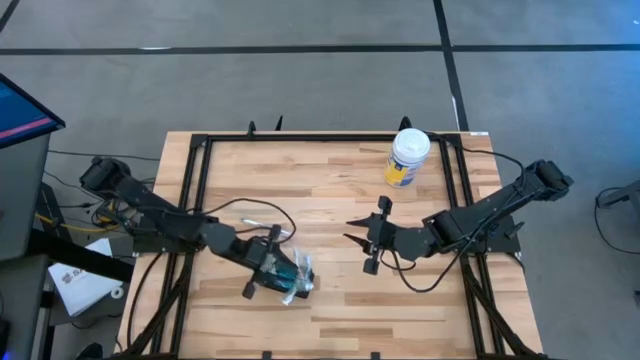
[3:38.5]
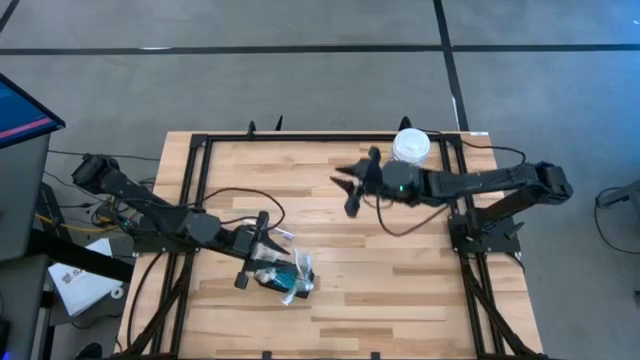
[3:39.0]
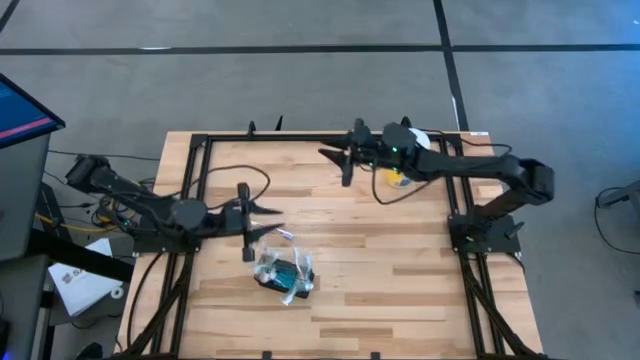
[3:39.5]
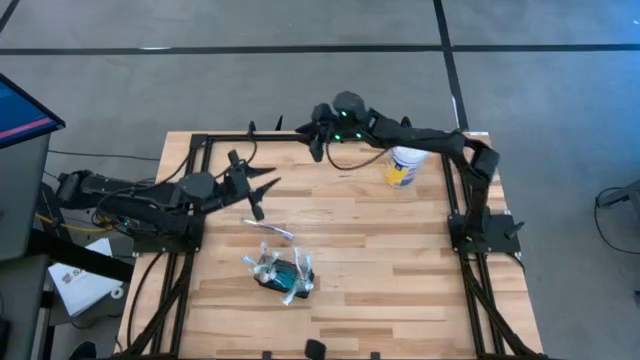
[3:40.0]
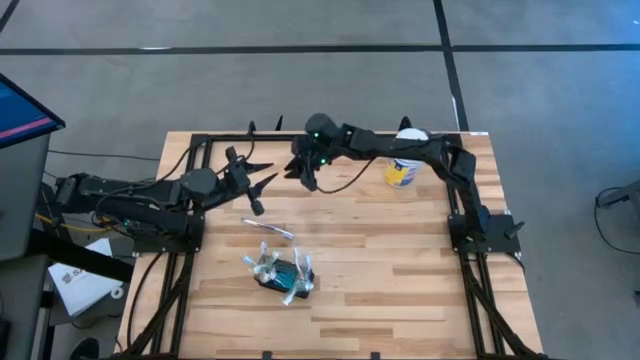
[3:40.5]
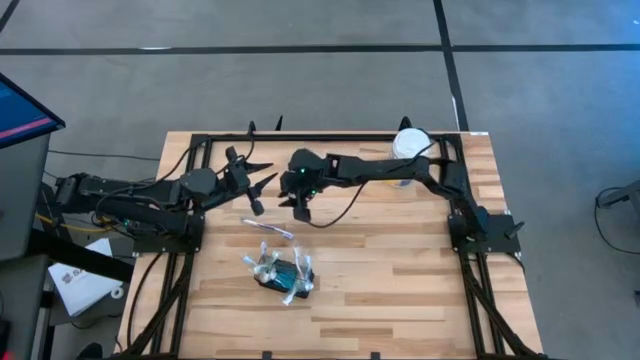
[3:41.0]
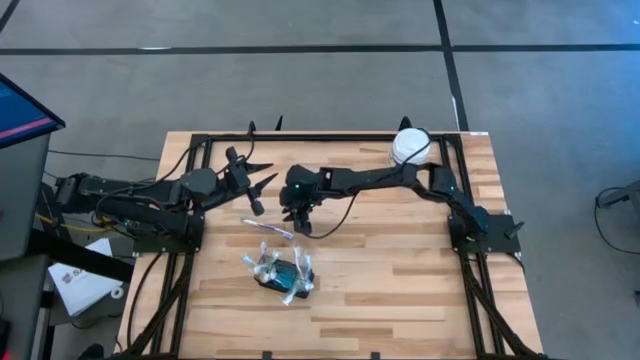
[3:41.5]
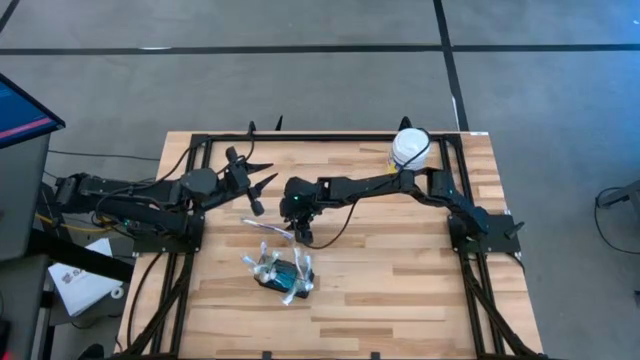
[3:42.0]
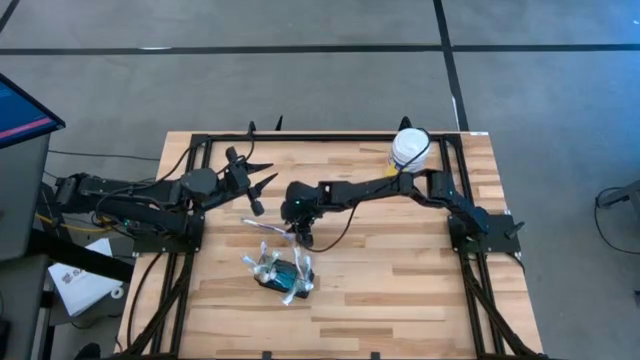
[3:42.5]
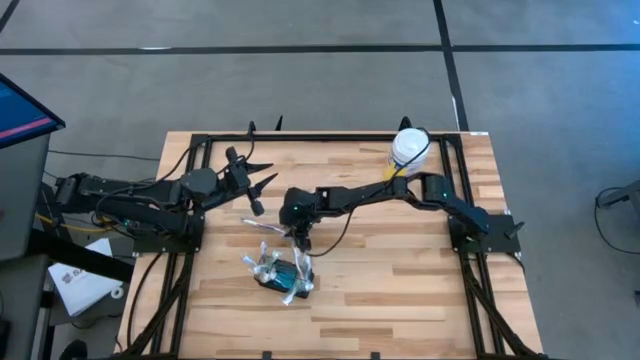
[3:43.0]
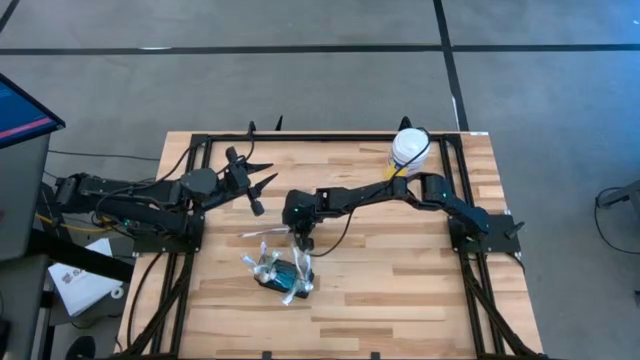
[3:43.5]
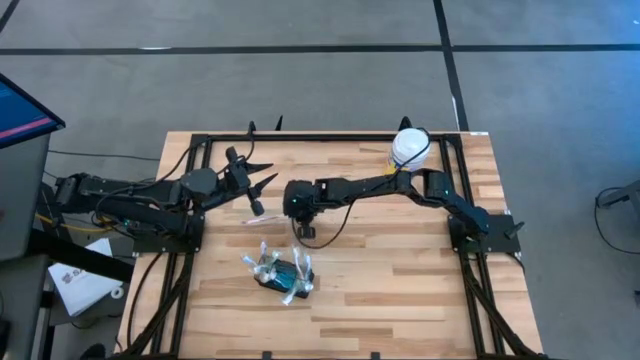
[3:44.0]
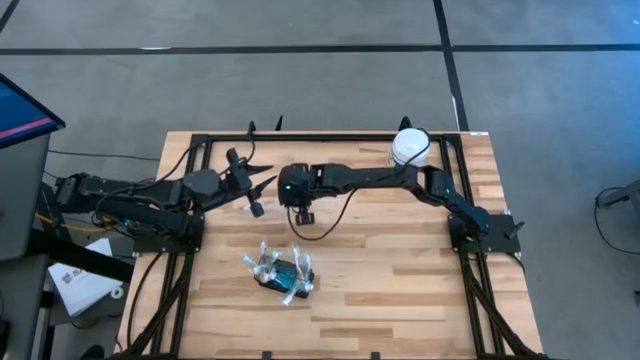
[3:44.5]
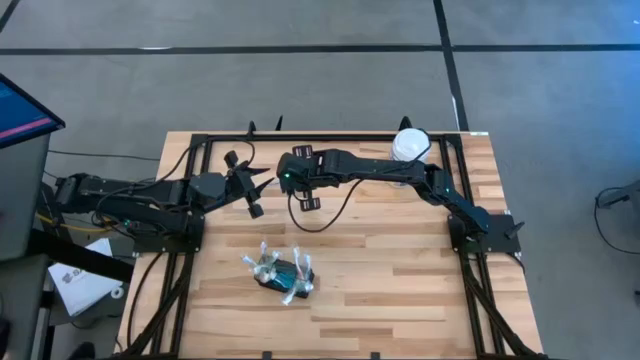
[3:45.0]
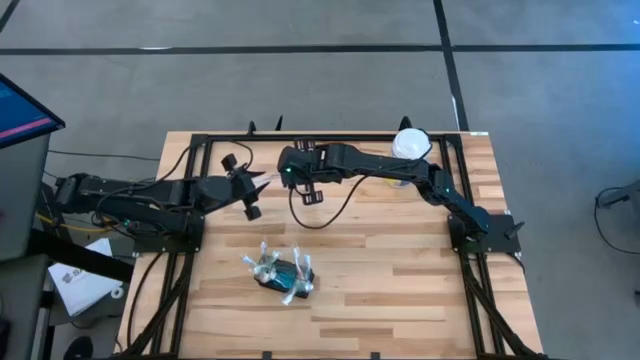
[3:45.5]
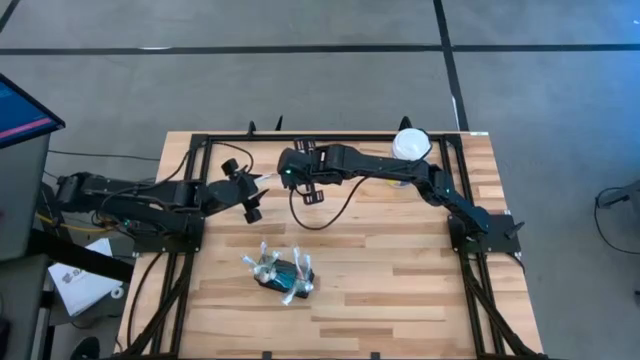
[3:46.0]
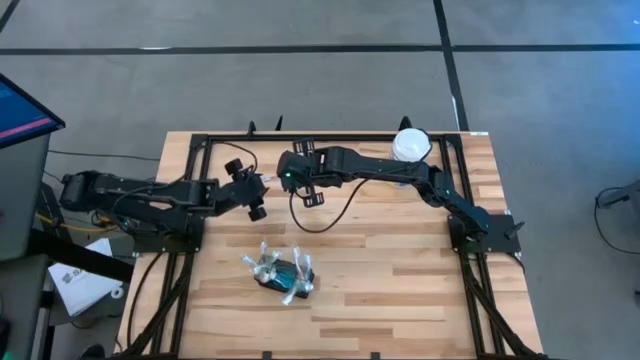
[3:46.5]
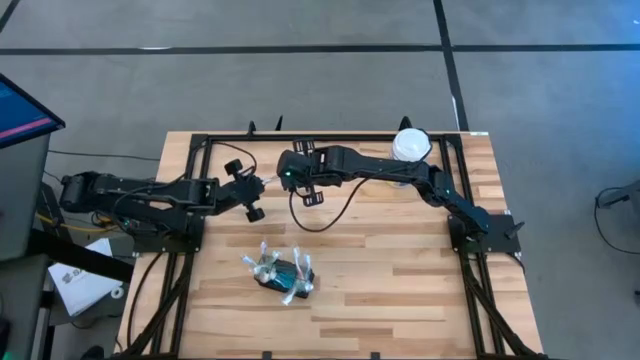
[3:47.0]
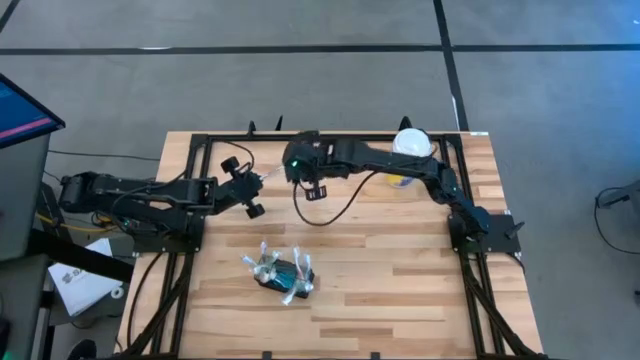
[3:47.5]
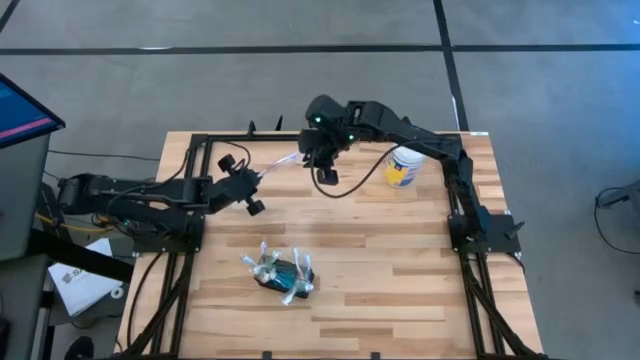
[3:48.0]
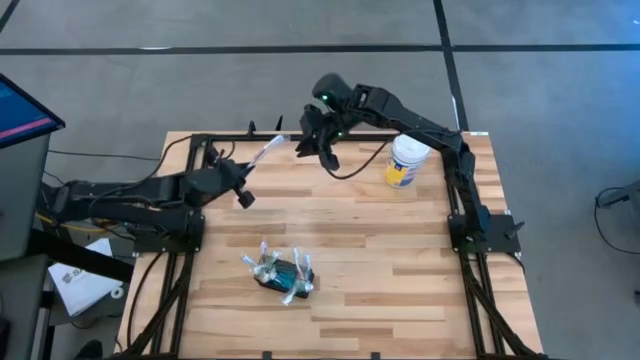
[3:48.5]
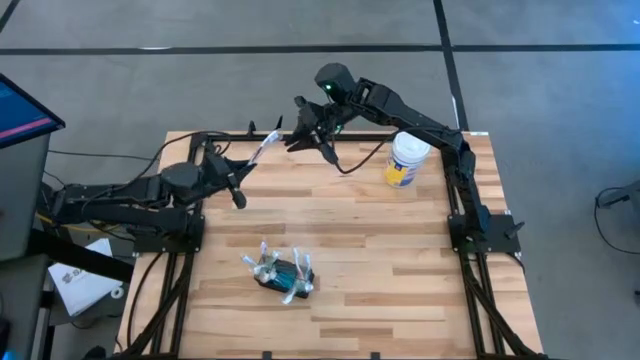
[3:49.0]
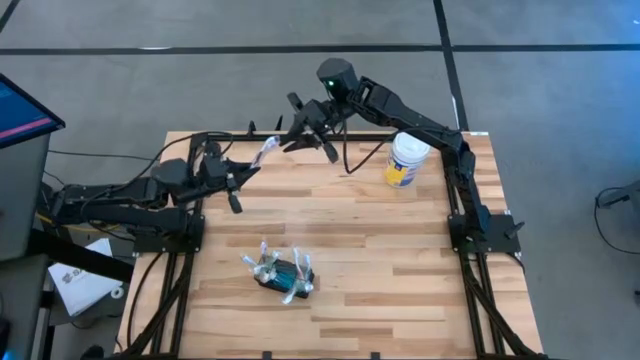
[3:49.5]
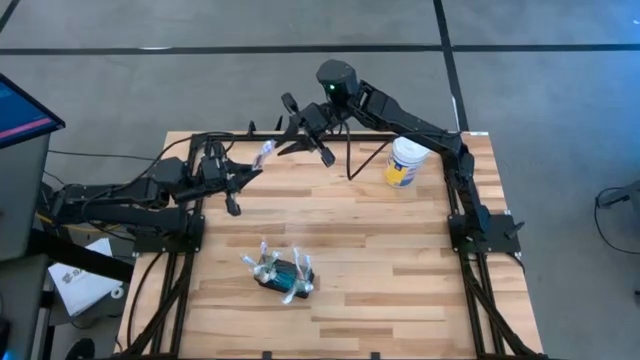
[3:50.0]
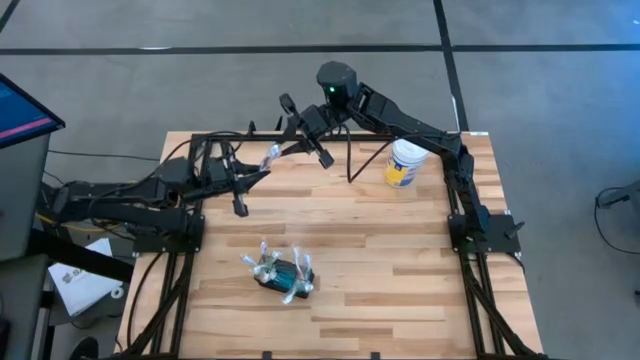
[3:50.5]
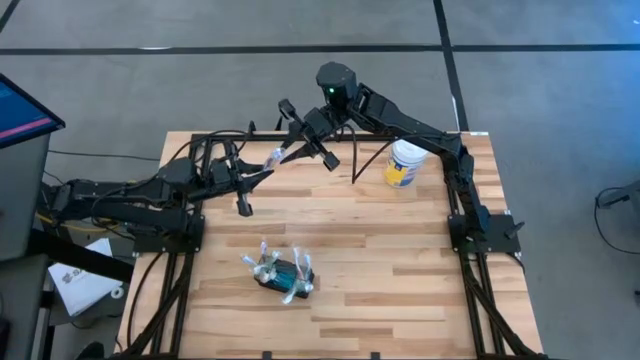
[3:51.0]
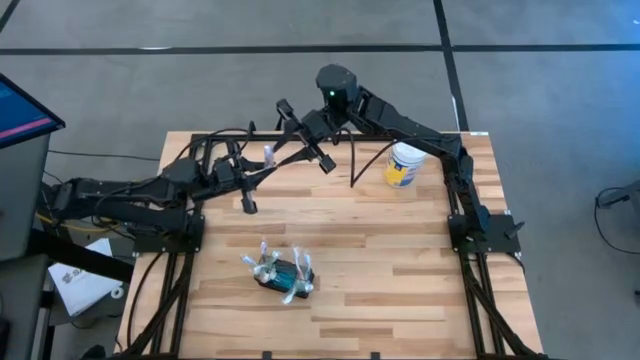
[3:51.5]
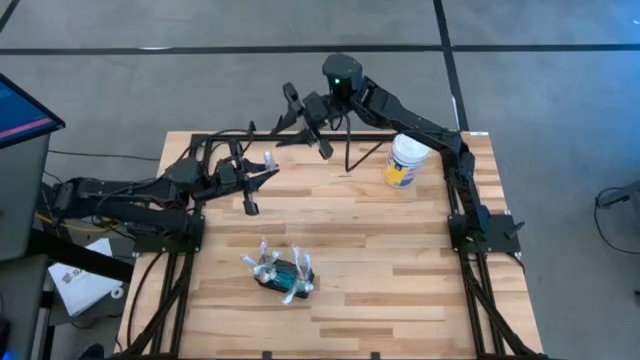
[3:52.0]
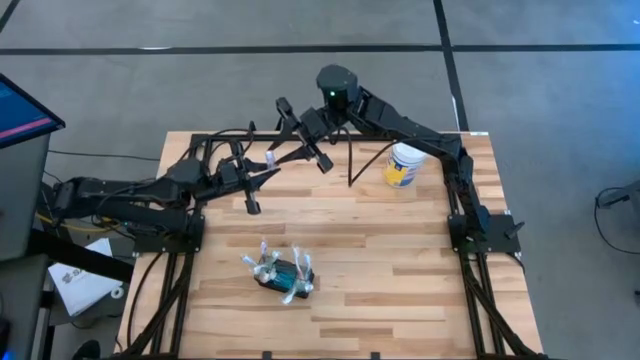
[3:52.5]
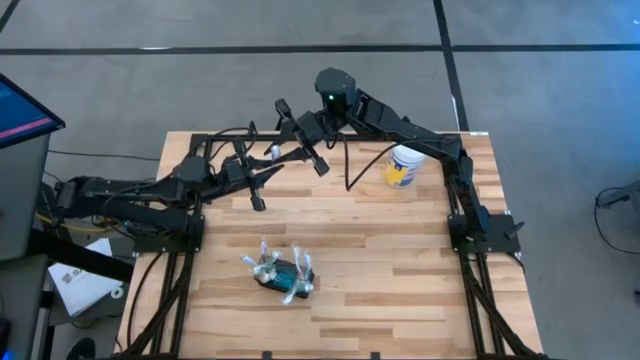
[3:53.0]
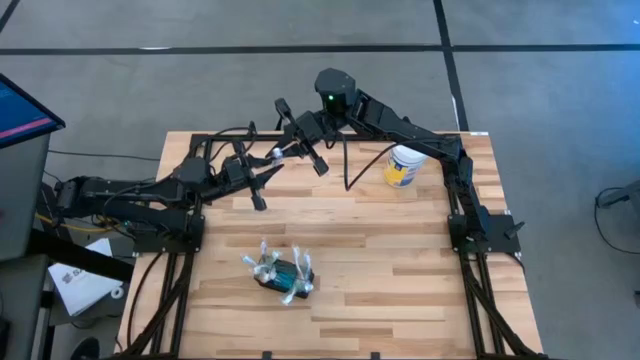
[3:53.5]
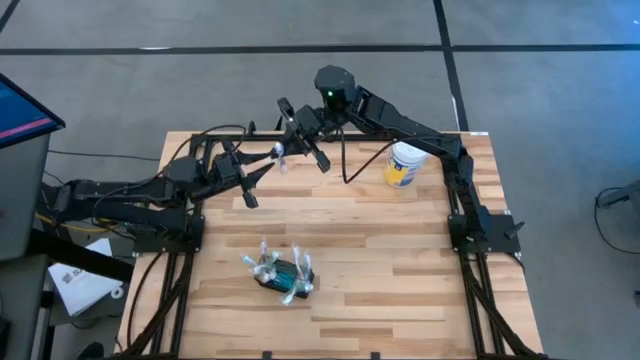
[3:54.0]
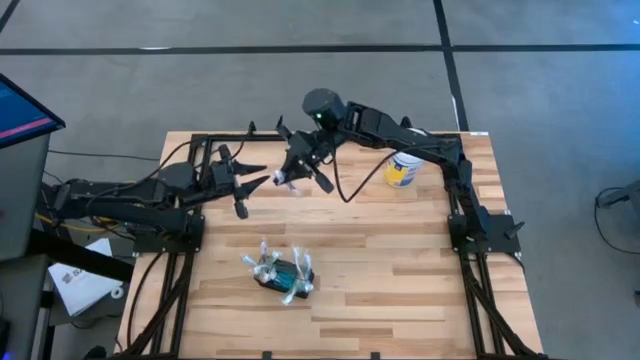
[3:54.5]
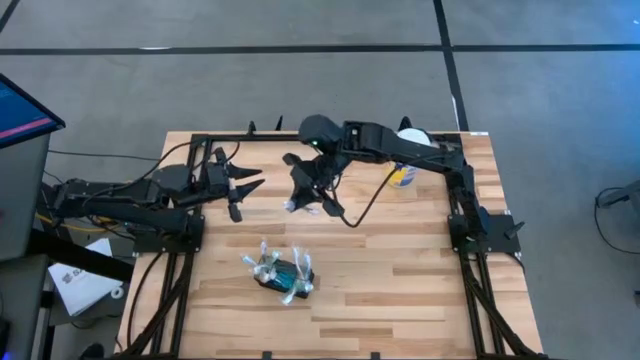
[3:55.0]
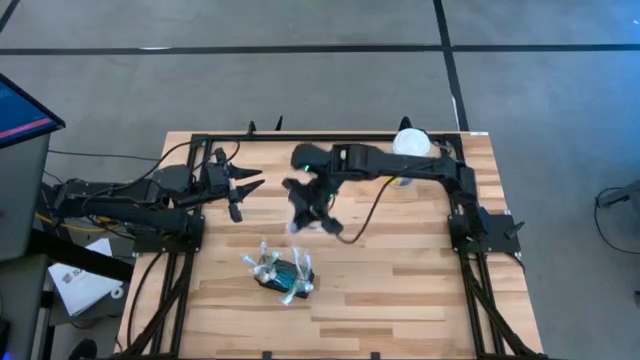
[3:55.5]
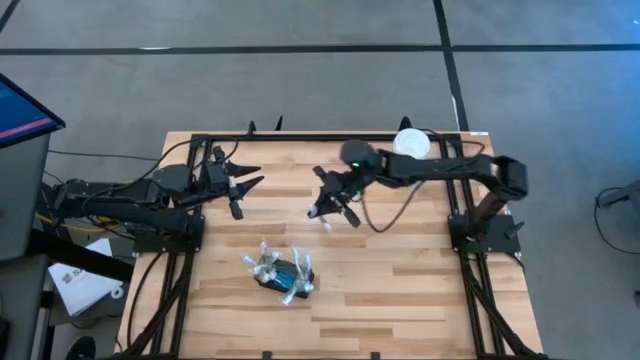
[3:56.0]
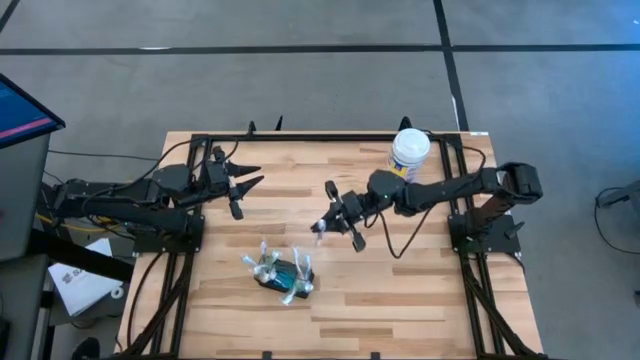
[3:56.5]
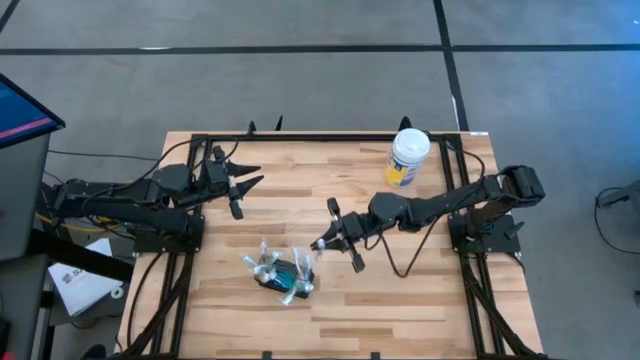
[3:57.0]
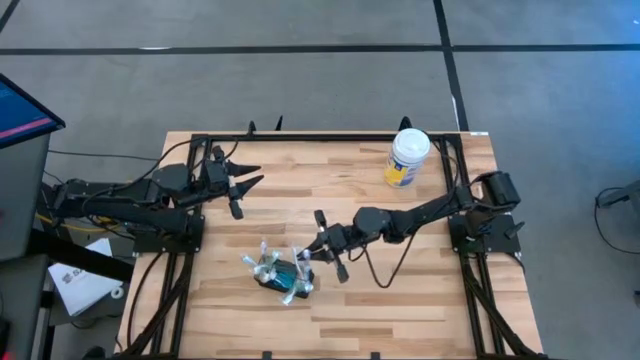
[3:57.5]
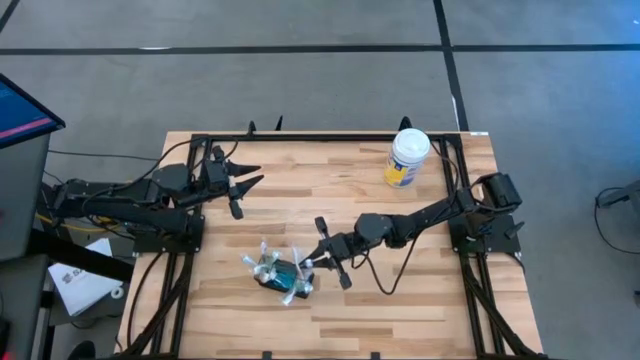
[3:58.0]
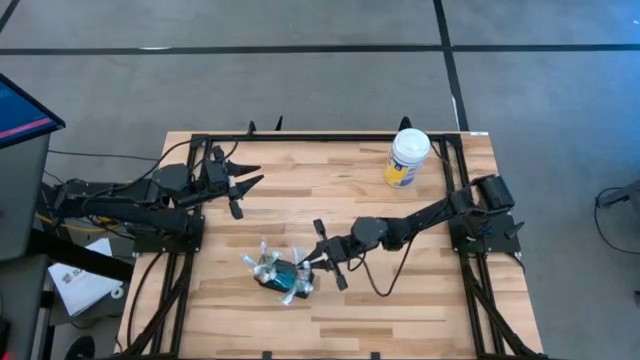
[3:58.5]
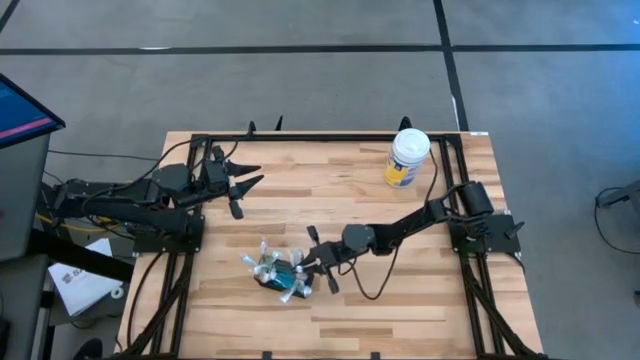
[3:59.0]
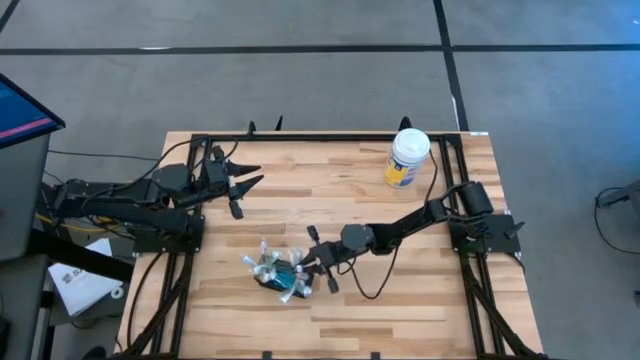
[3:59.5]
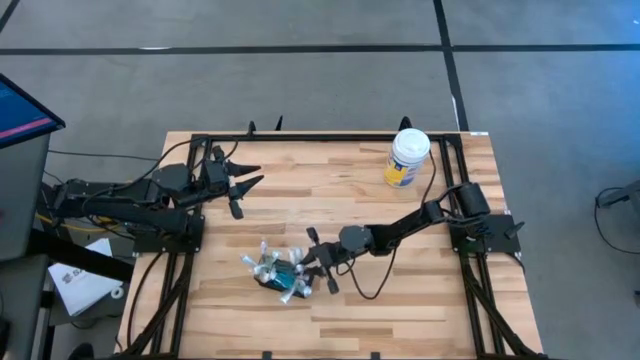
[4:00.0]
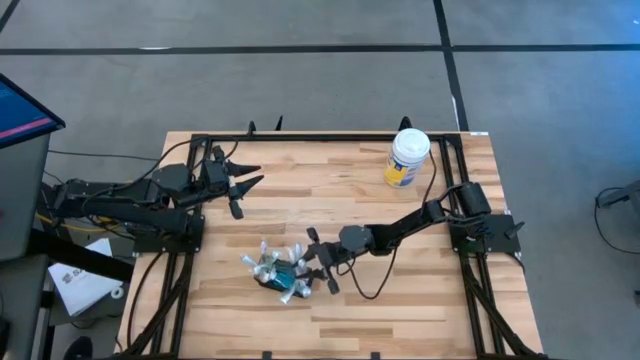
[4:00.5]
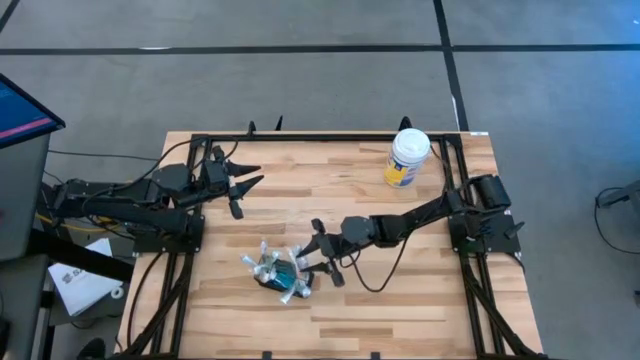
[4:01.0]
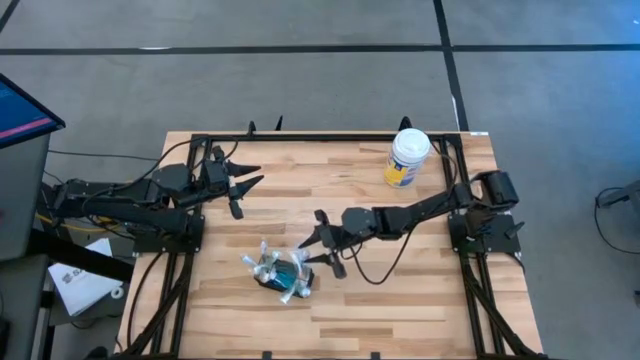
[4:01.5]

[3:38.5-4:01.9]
Task: Pick & Place toothbrushing station
Put the purple toothbrush into the mesh organizer
